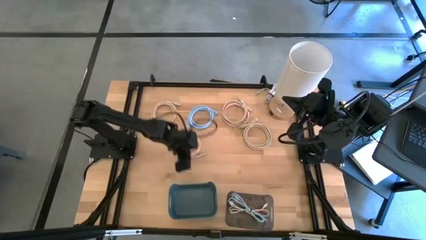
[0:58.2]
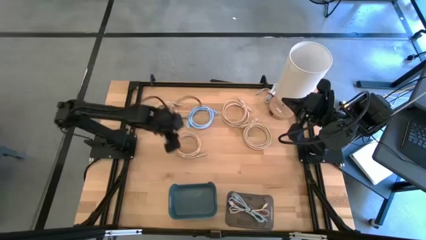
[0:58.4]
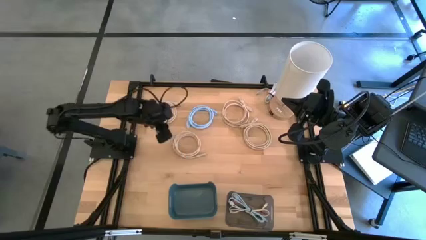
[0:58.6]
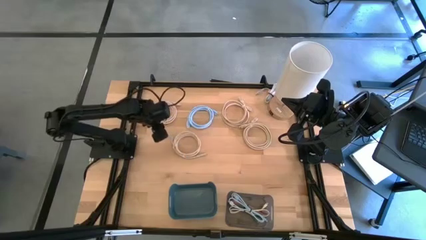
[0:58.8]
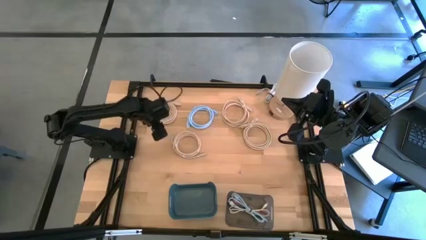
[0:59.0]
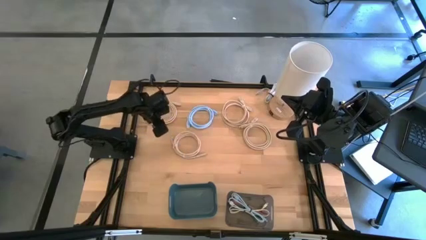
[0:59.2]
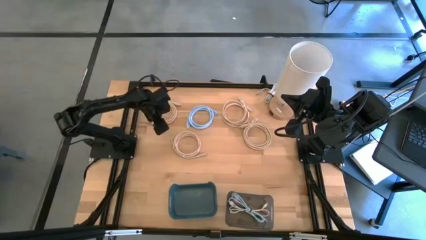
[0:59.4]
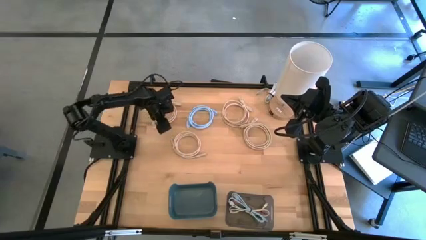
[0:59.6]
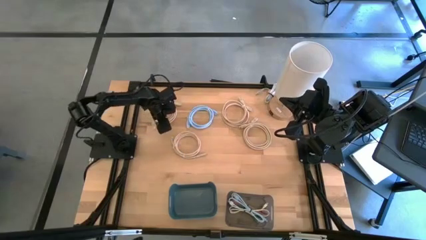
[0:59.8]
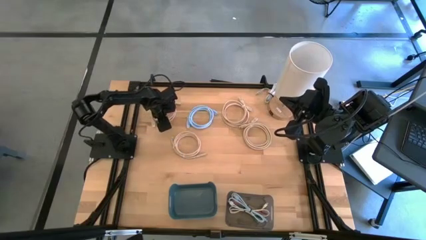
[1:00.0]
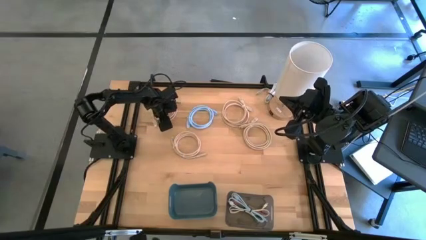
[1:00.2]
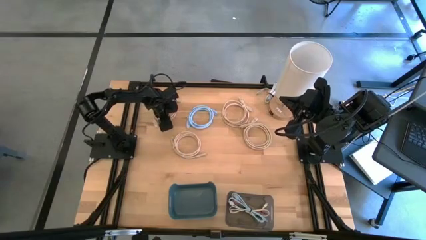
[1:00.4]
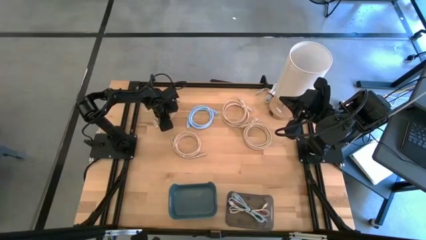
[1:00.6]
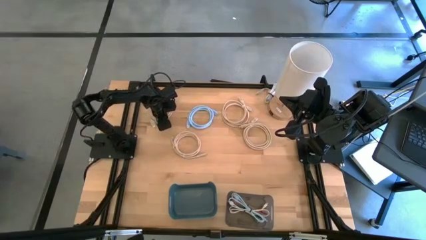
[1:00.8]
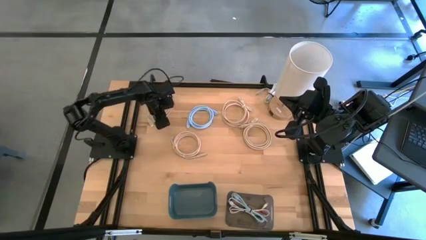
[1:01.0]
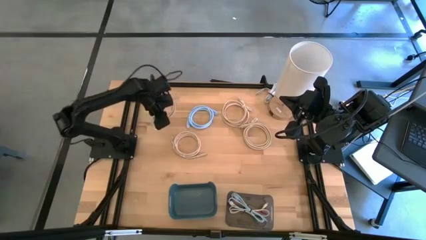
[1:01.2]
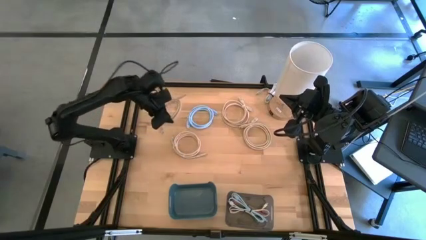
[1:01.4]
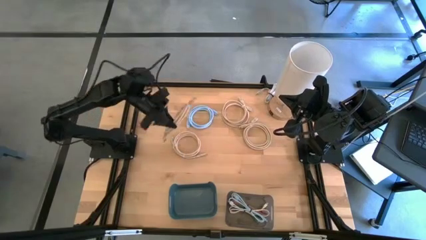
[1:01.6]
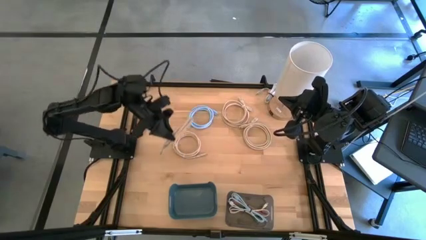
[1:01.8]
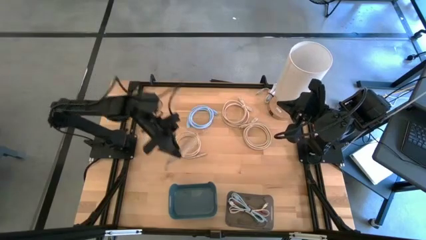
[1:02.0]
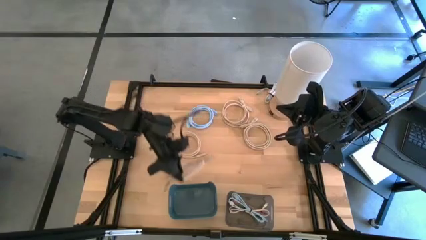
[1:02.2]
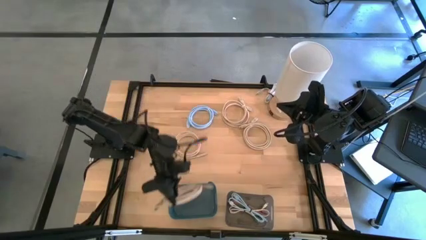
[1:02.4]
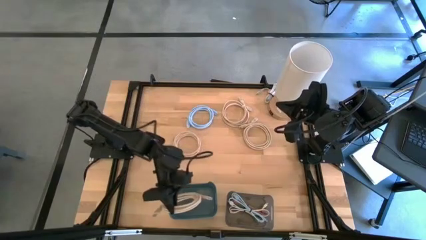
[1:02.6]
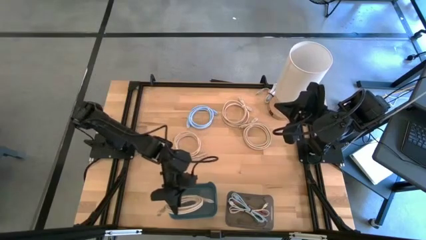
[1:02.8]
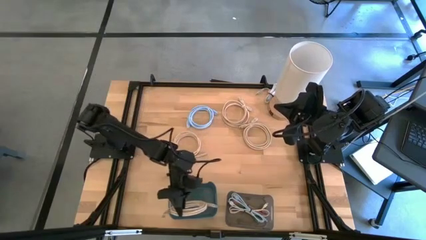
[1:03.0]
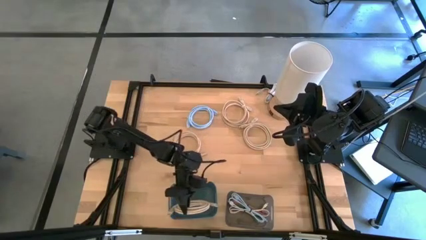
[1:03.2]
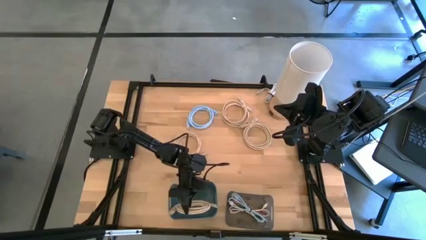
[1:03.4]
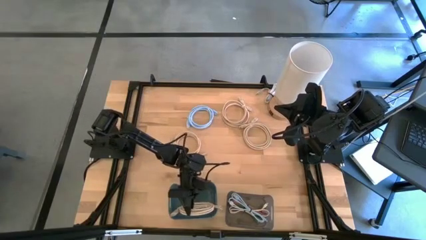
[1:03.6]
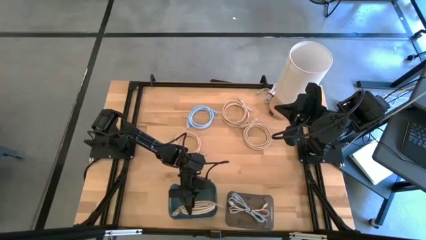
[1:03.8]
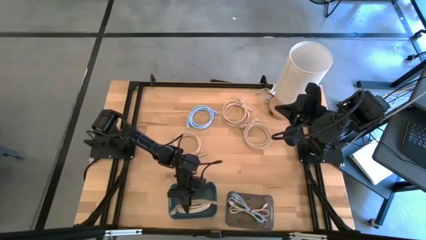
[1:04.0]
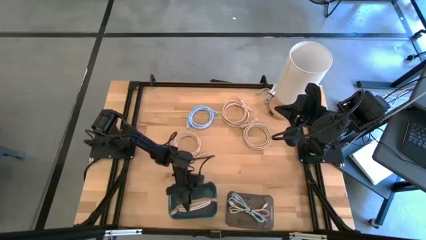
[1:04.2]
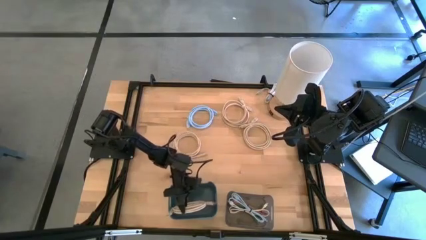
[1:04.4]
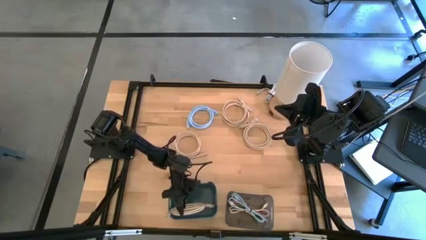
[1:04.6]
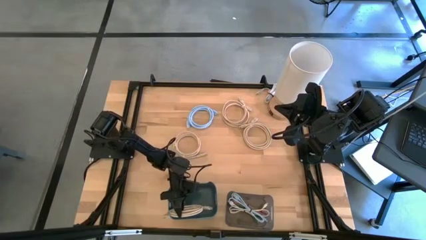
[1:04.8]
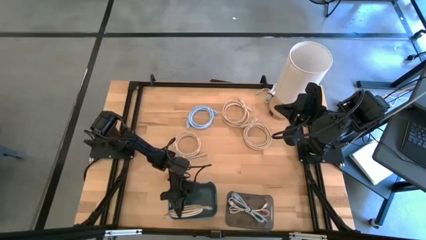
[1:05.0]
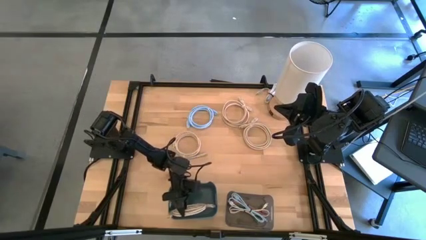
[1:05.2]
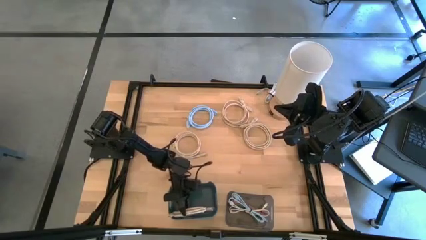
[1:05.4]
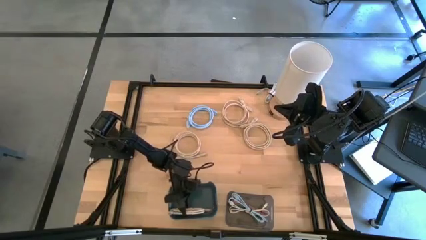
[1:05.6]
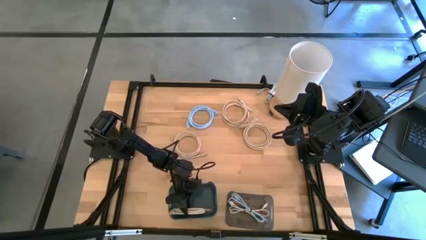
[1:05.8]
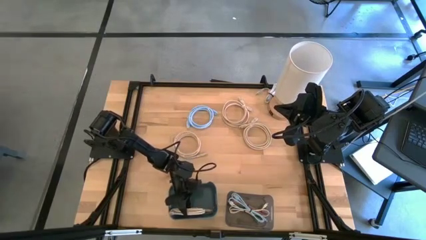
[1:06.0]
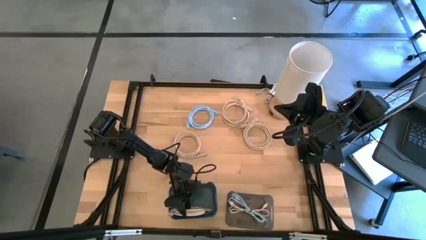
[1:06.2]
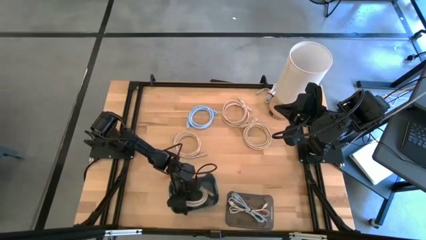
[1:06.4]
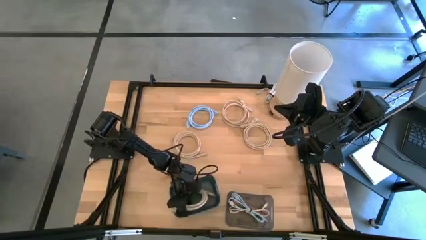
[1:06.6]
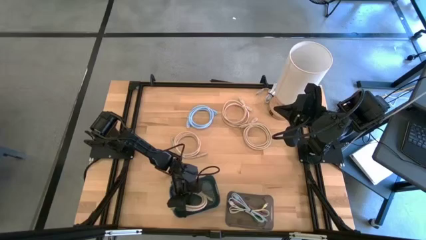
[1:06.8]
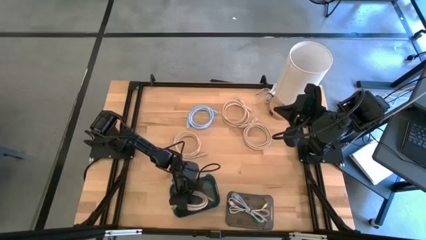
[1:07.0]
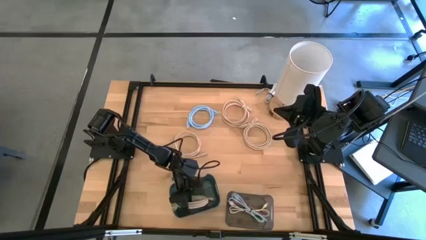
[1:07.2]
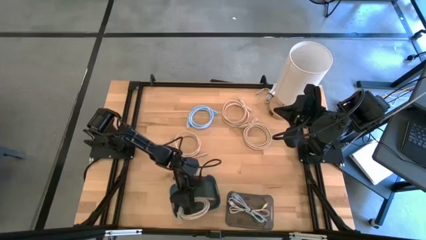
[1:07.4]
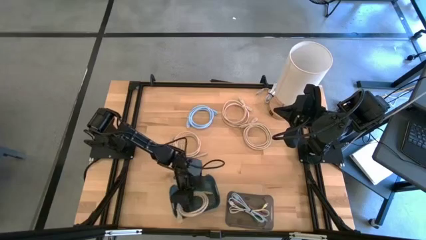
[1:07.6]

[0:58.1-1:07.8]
Put the brown HDMI cable into the blue bin

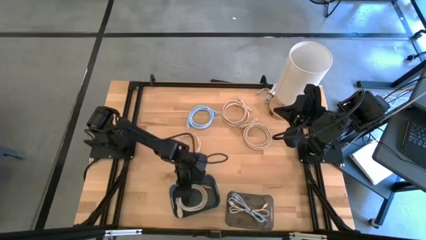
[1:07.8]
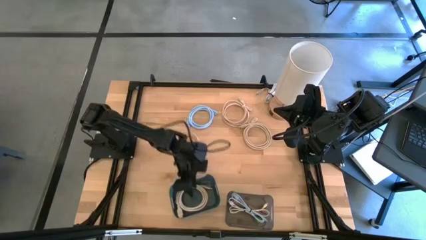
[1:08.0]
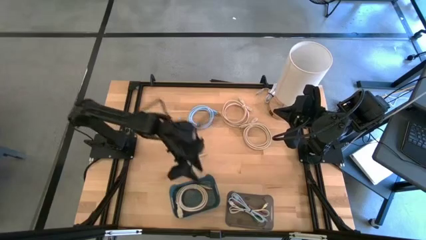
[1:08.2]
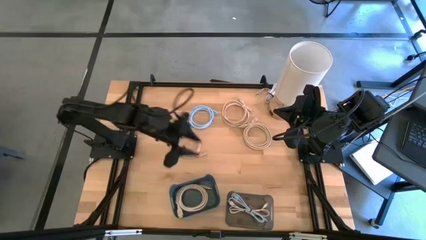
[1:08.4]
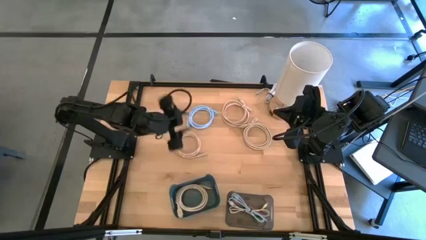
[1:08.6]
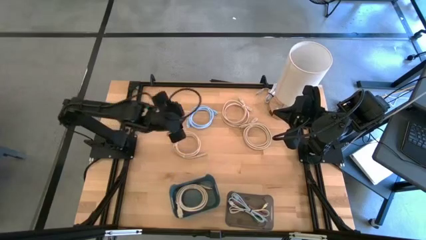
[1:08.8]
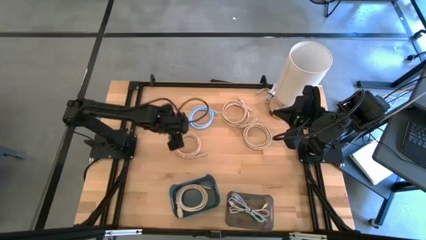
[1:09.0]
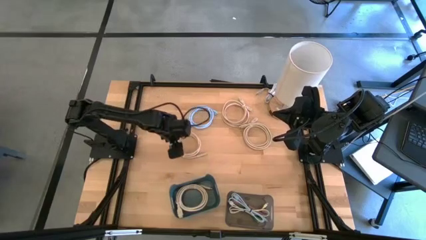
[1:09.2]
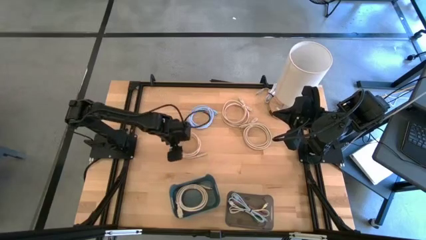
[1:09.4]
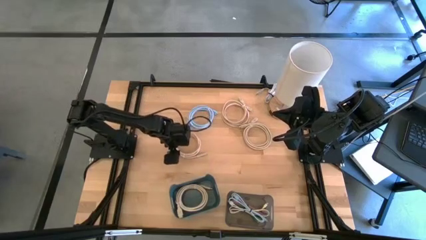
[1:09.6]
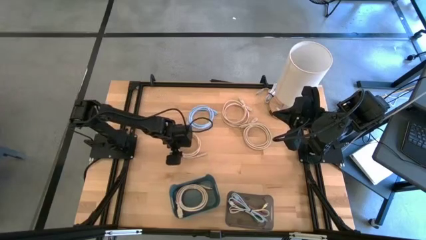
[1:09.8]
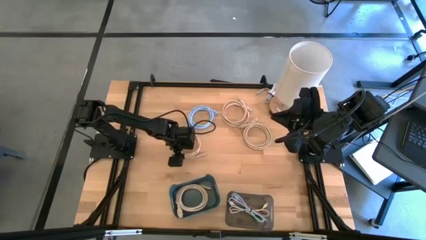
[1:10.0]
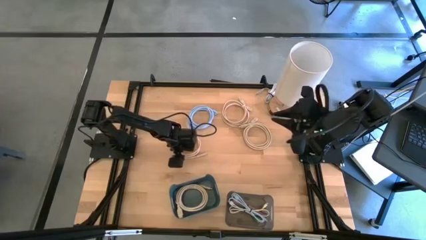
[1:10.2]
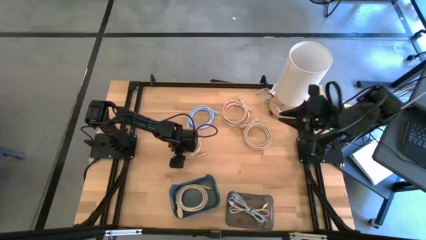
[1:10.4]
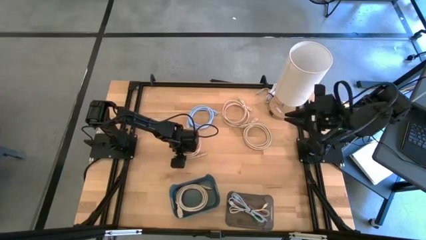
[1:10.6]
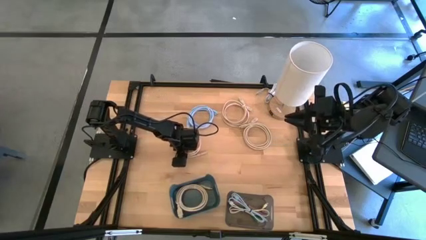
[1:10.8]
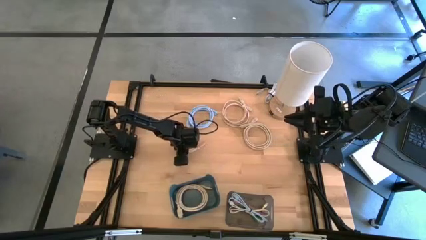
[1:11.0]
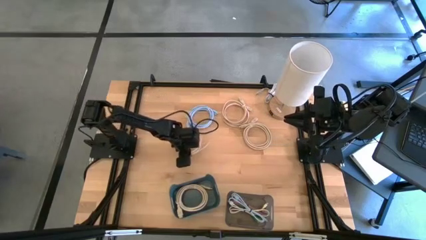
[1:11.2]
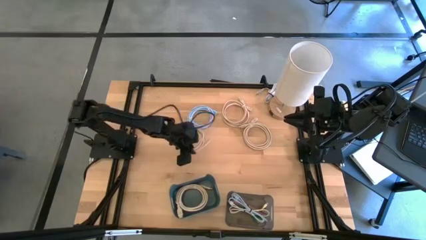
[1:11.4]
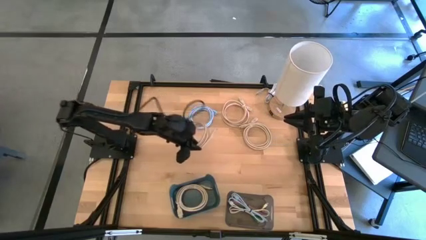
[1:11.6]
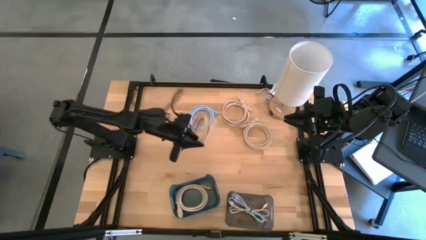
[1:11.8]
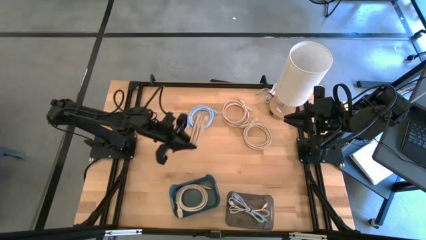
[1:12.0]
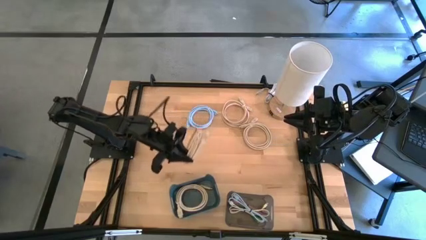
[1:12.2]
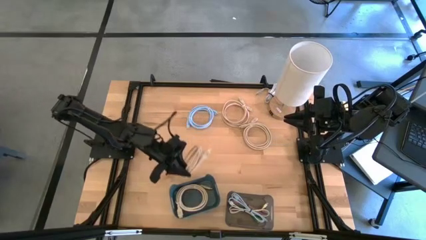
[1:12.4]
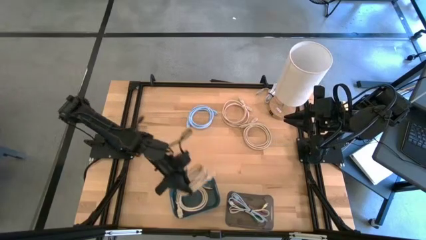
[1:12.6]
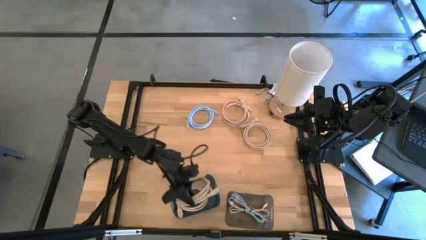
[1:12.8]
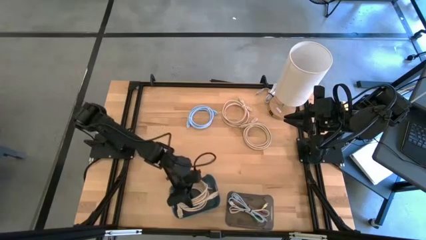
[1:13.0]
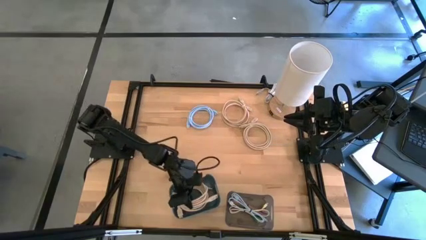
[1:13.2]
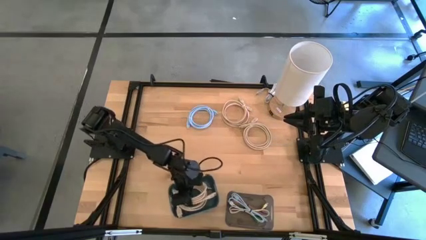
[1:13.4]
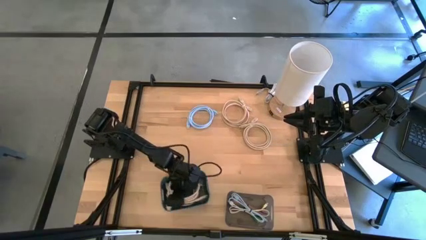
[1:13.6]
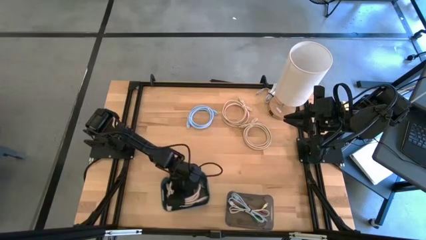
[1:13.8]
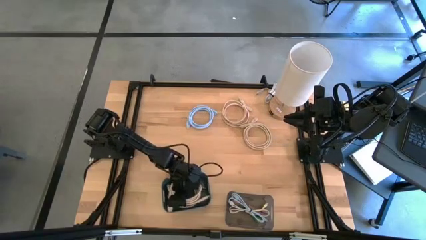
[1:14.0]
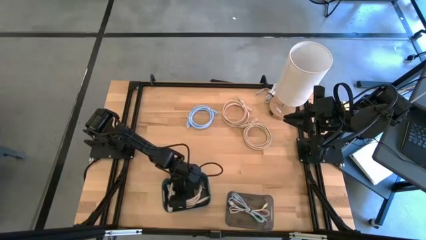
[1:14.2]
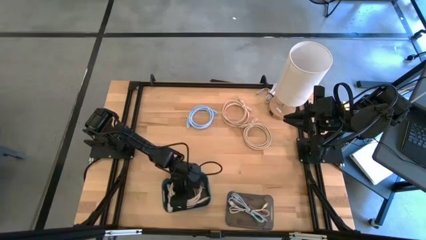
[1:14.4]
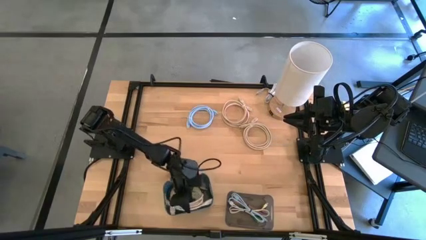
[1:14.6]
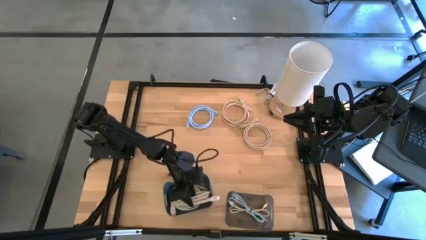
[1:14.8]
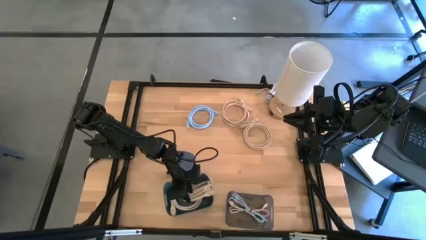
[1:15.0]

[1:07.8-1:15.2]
Put the brown HDMI cable into the blue bin
